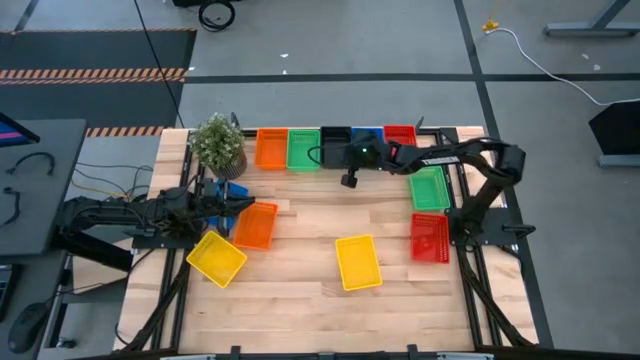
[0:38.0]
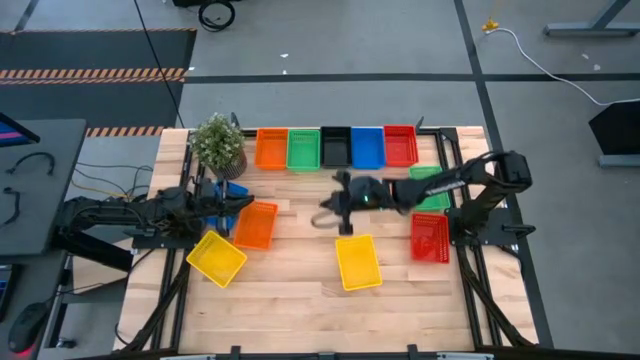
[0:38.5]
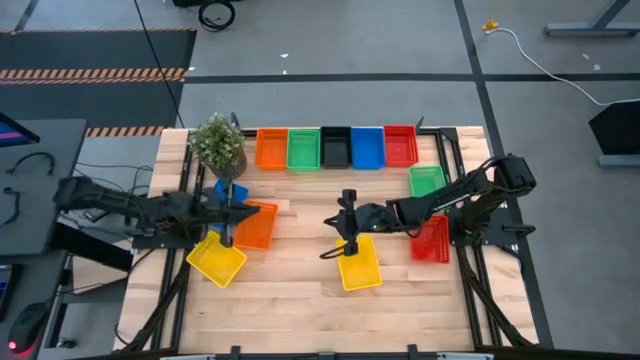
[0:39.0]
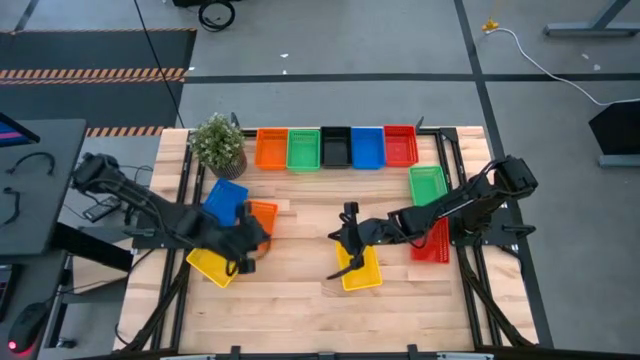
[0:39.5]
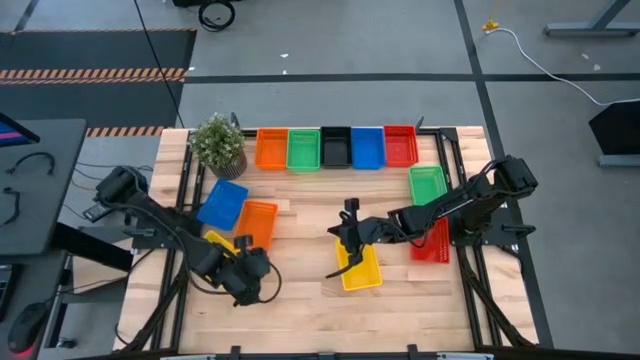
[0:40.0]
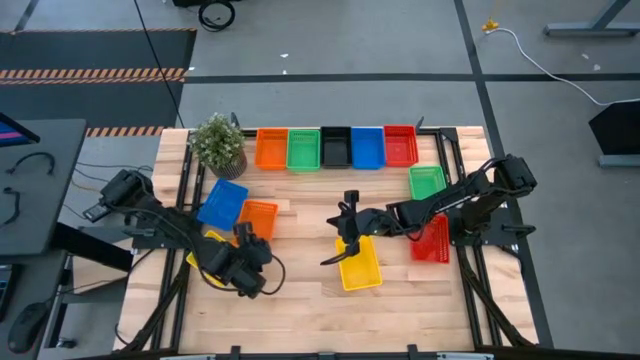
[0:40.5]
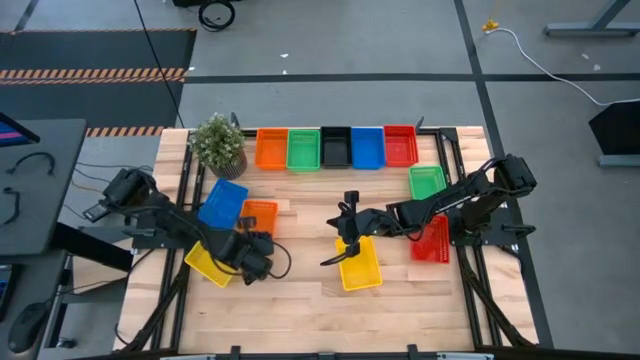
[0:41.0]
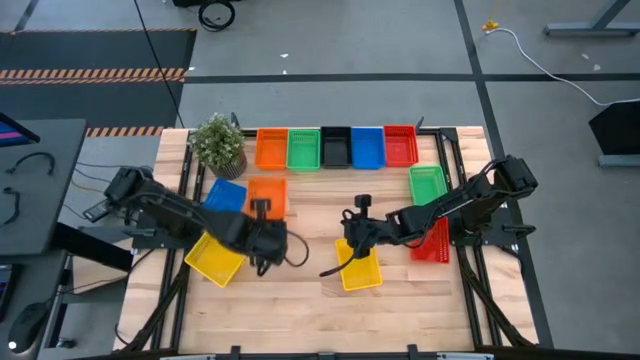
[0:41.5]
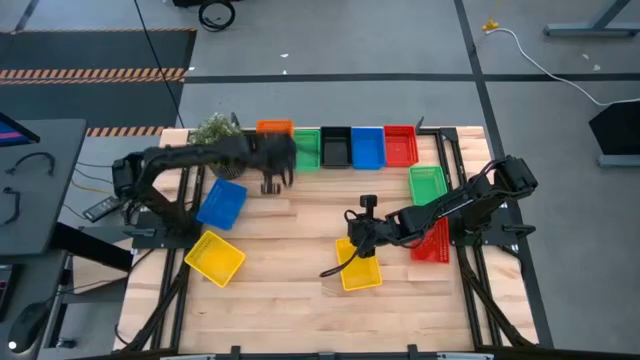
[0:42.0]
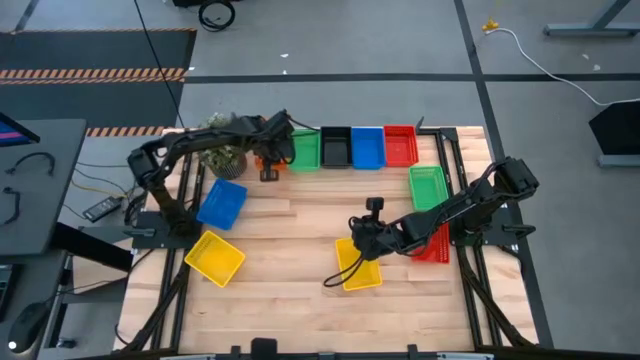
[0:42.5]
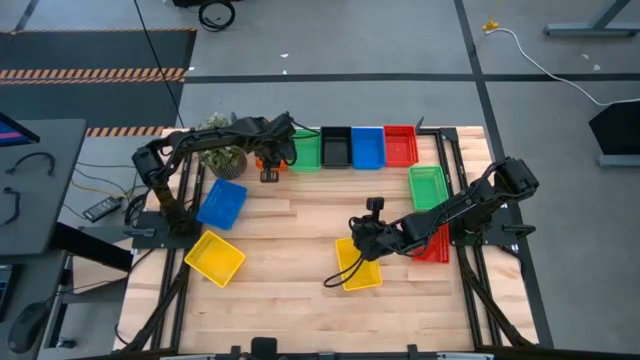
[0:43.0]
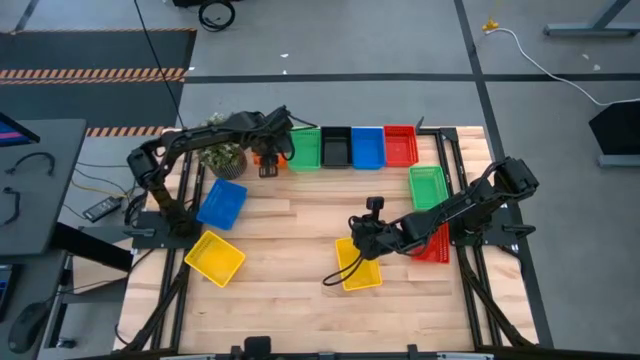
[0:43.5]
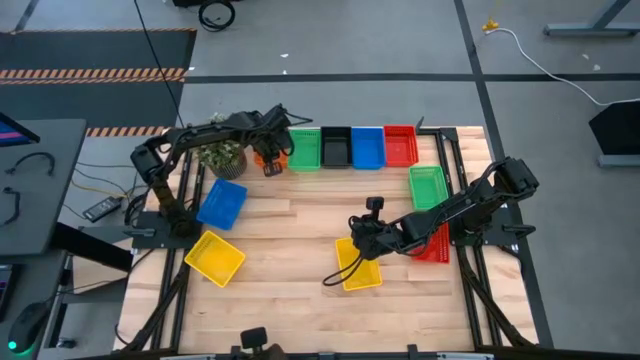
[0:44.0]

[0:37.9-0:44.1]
Stack the bottom orange bin on top of the top orange bin

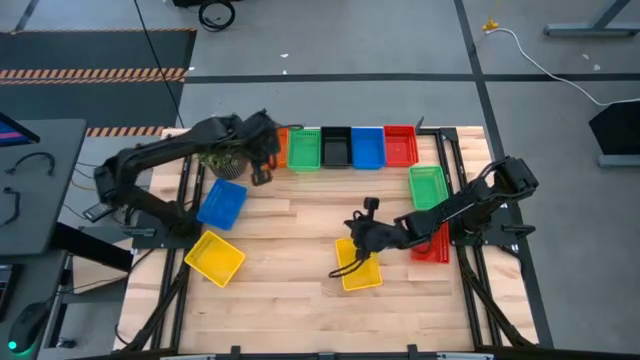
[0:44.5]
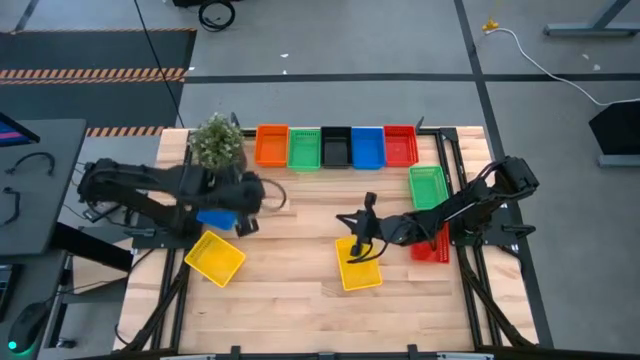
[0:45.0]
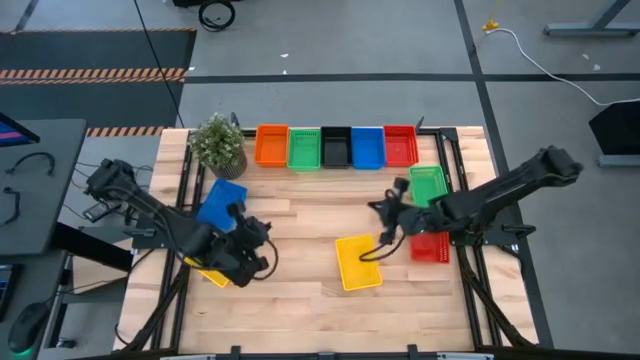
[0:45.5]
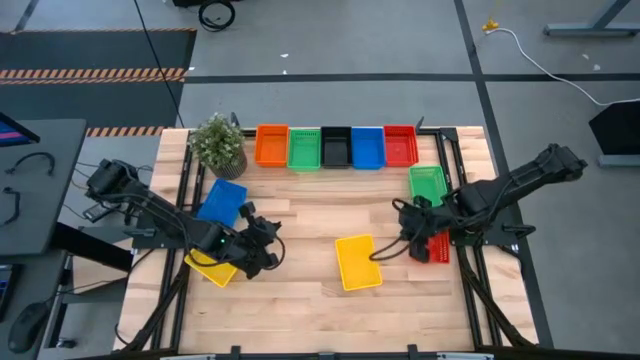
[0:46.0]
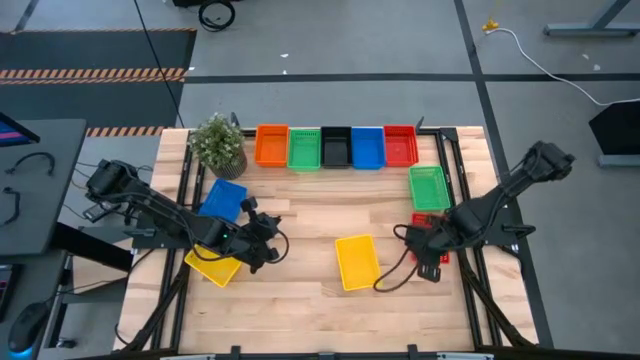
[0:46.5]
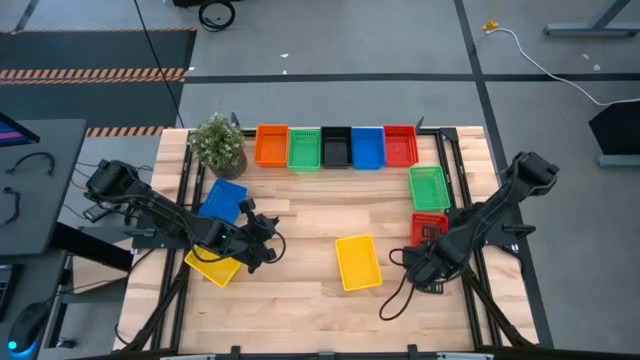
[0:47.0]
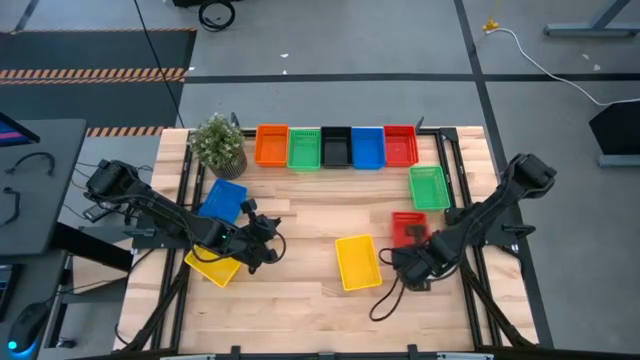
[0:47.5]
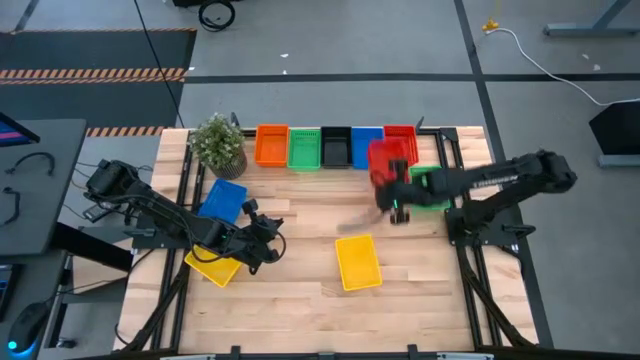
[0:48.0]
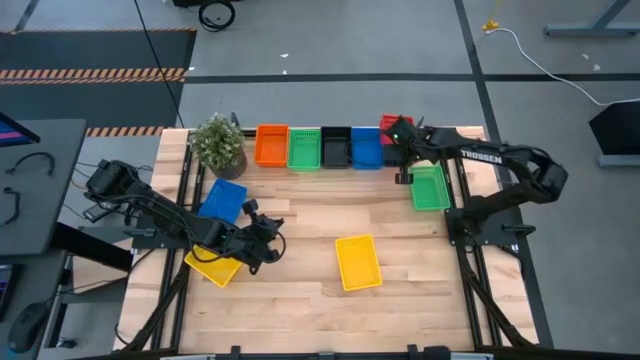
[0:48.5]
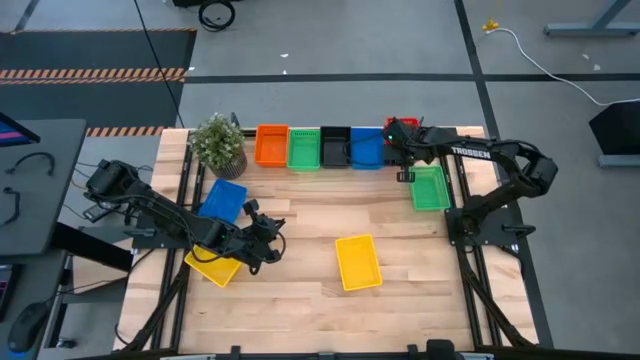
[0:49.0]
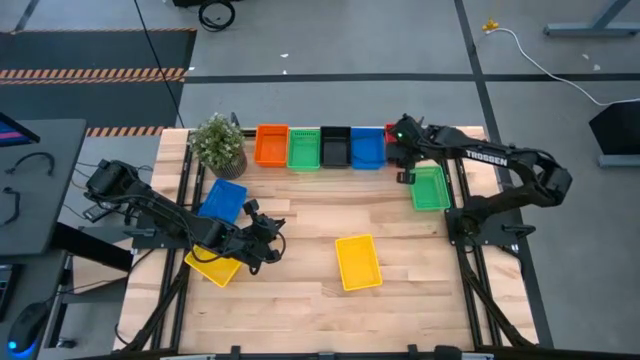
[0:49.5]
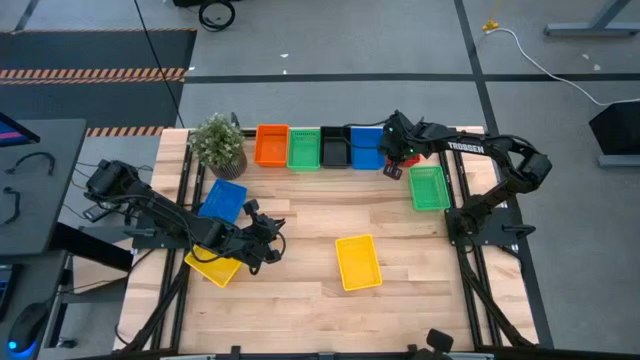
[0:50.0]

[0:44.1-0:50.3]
Stack the bottom red bin on top of the top red bin

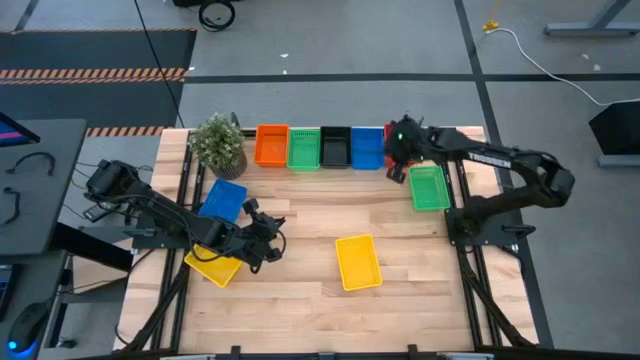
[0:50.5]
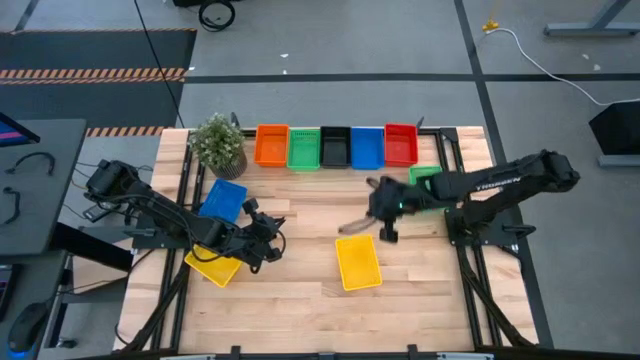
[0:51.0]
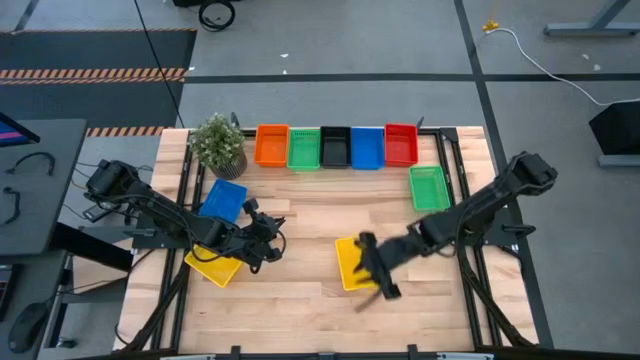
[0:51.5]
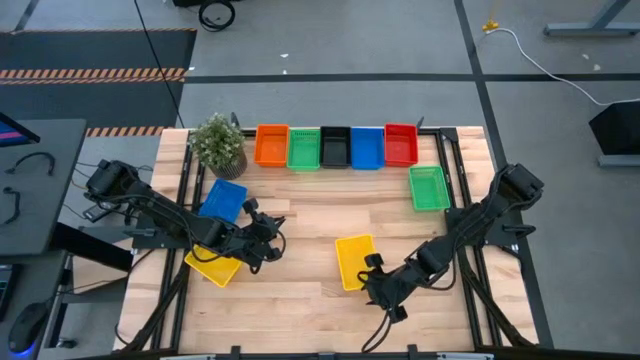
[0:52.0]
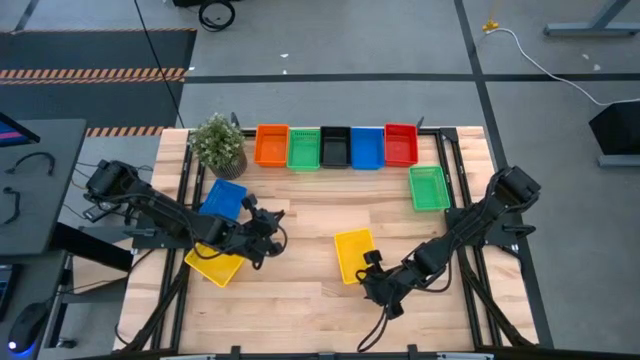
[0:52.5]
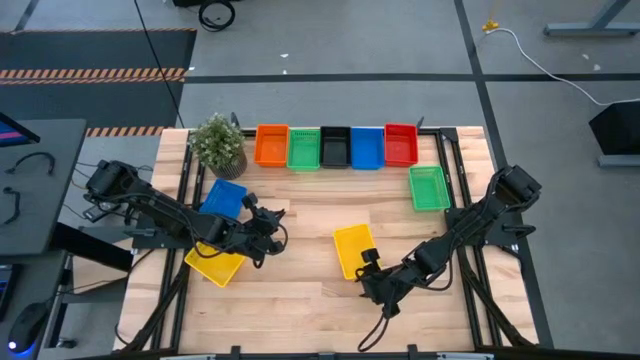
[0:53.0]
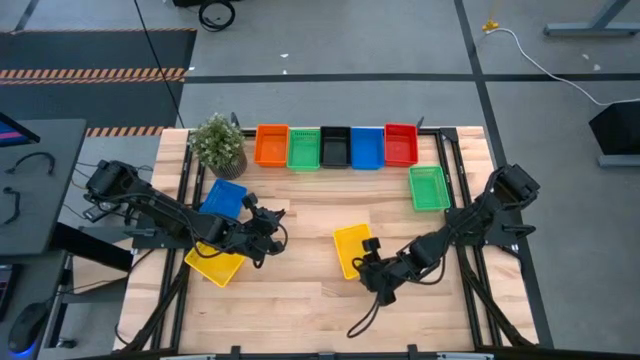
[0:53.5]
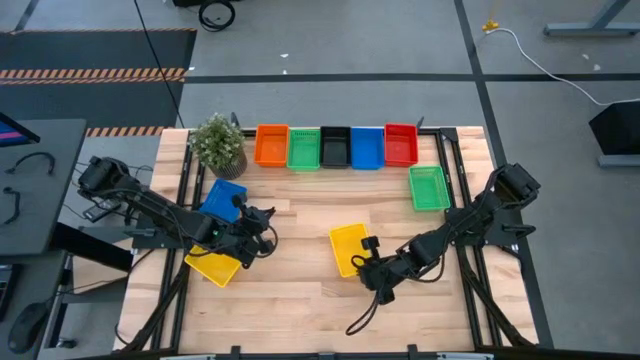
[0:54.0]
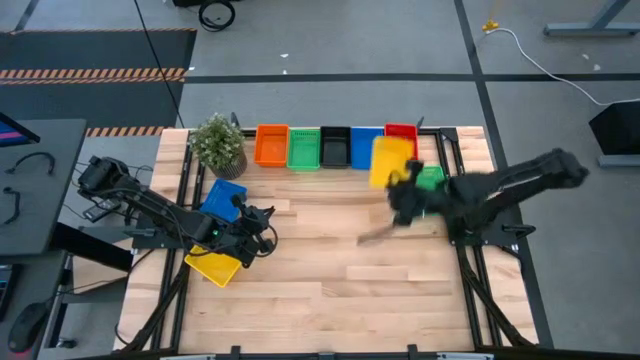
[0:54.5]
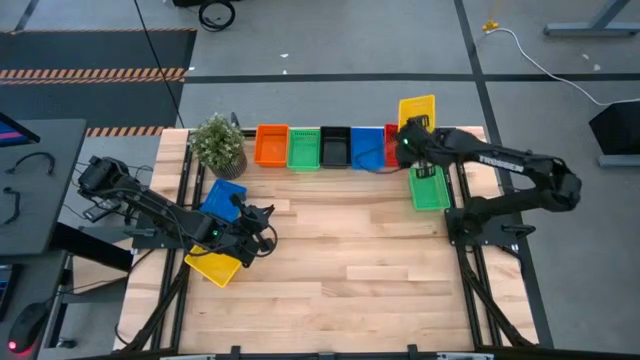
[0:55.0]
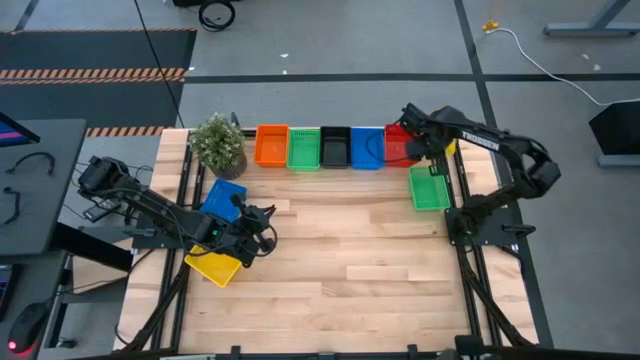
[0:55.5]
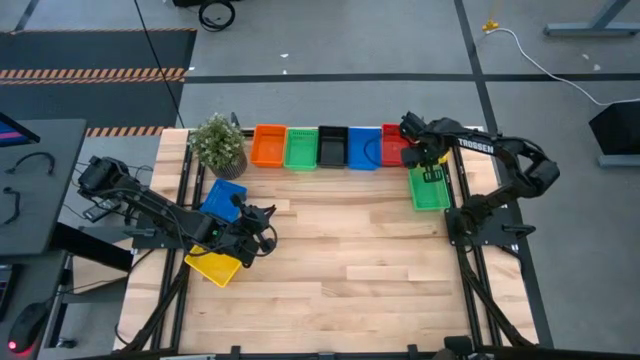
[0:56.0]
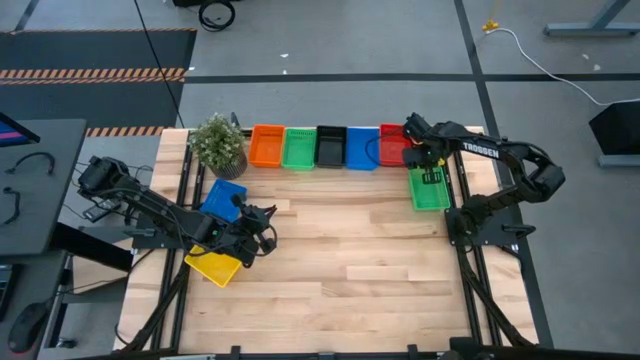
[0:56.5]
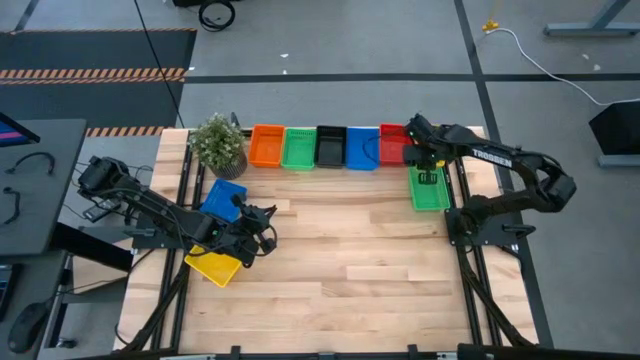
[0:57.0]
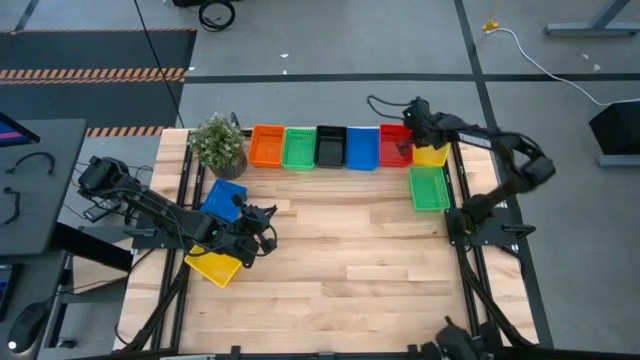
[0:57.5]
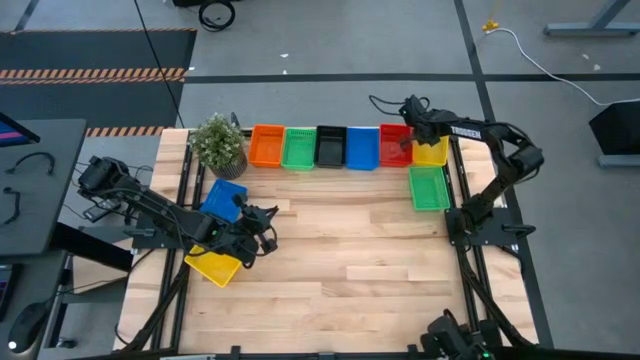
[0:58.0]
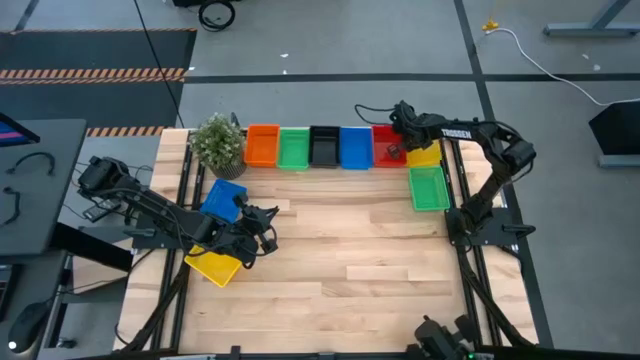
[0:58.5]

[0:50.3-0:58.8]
Move the right yellow bin to the top right of the table
